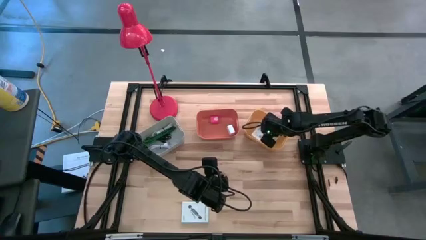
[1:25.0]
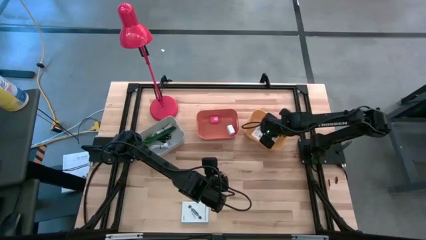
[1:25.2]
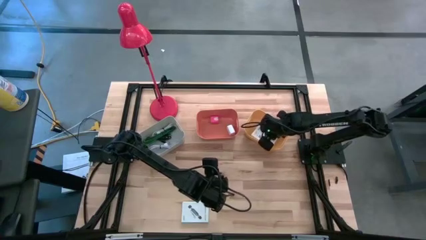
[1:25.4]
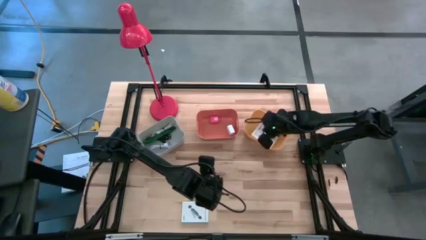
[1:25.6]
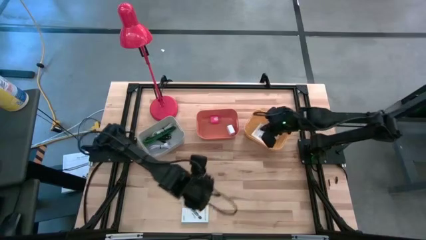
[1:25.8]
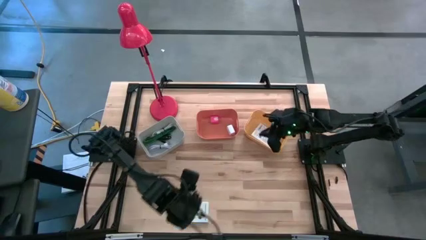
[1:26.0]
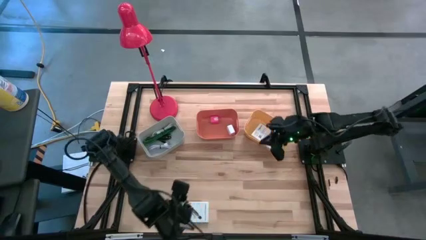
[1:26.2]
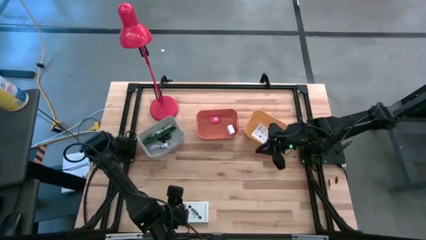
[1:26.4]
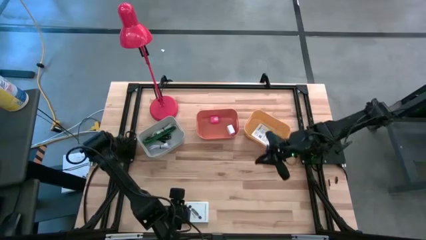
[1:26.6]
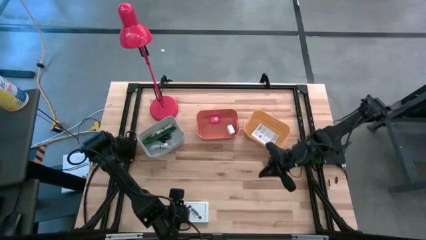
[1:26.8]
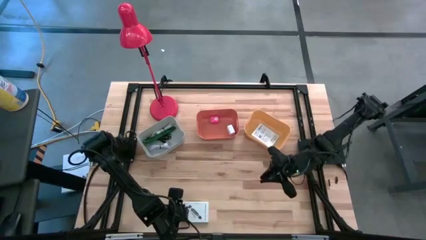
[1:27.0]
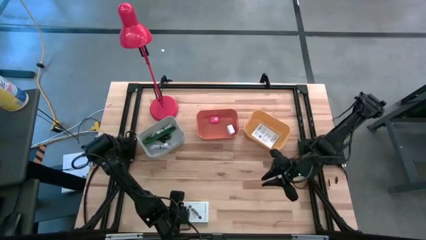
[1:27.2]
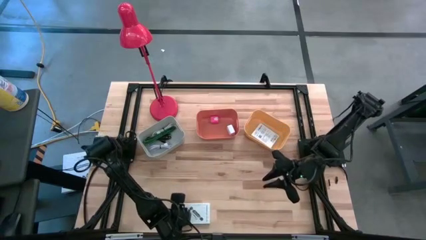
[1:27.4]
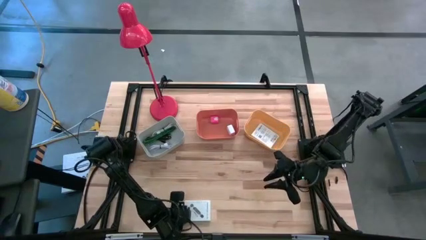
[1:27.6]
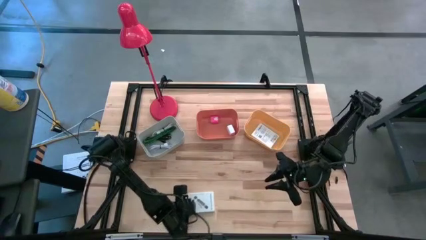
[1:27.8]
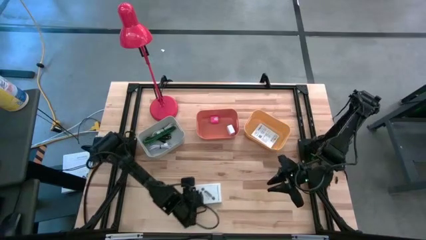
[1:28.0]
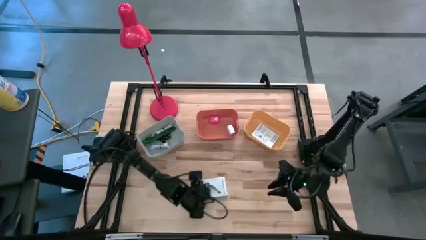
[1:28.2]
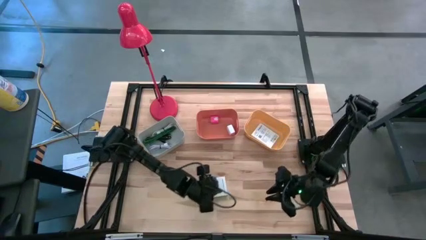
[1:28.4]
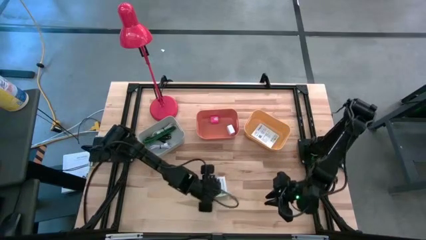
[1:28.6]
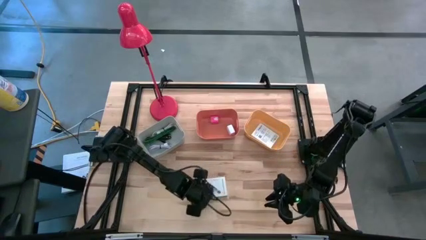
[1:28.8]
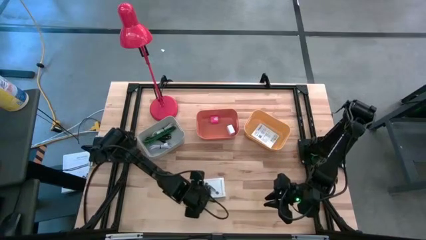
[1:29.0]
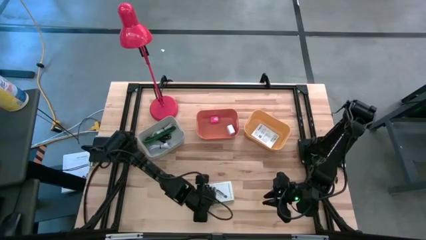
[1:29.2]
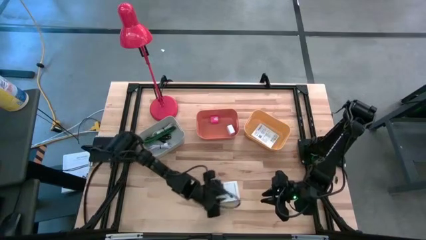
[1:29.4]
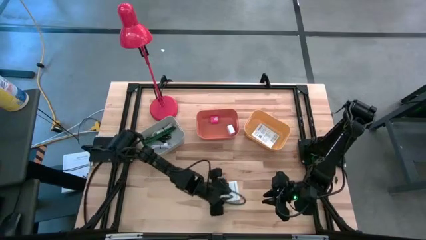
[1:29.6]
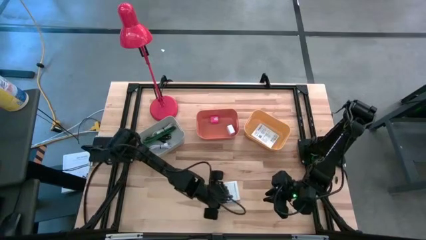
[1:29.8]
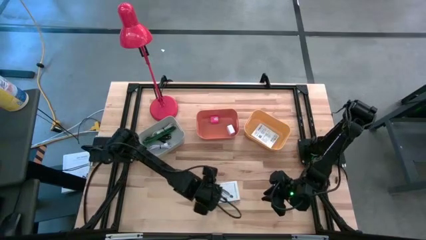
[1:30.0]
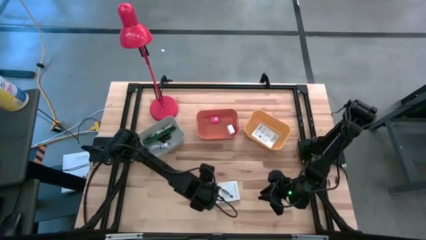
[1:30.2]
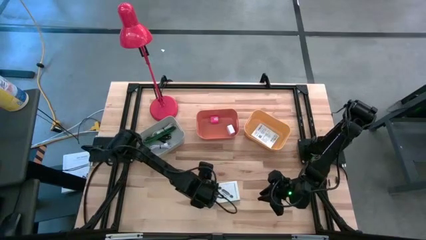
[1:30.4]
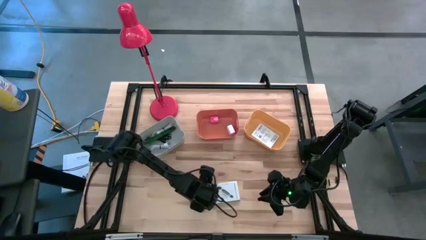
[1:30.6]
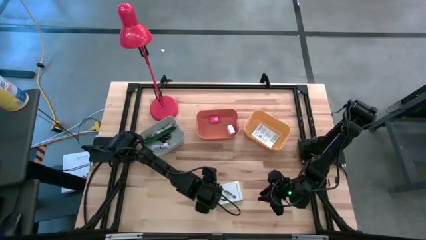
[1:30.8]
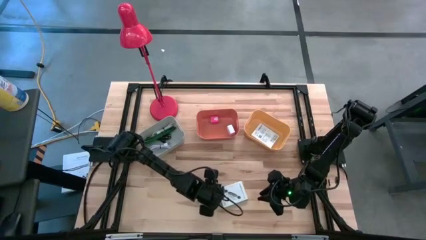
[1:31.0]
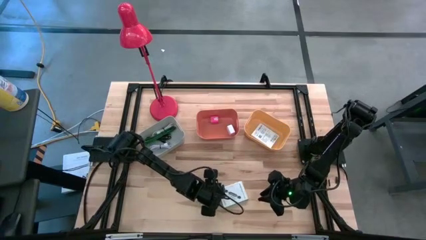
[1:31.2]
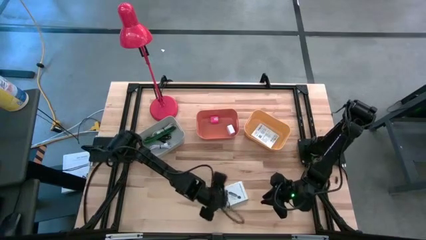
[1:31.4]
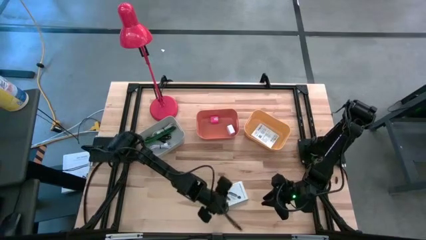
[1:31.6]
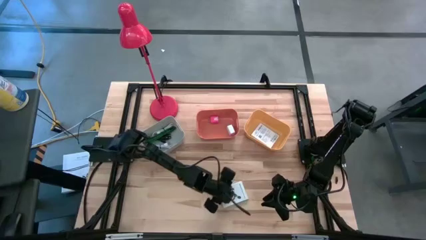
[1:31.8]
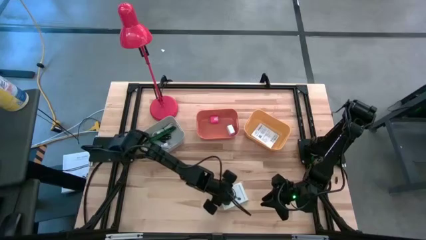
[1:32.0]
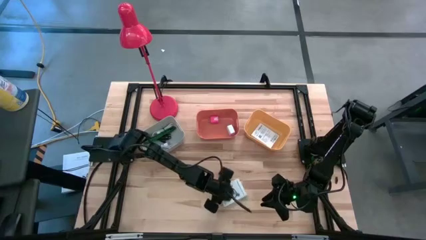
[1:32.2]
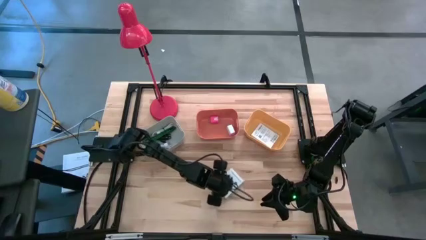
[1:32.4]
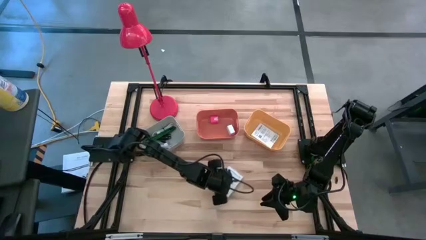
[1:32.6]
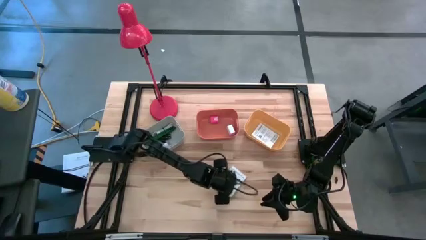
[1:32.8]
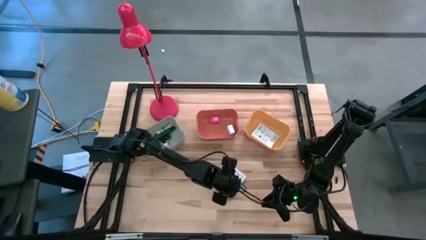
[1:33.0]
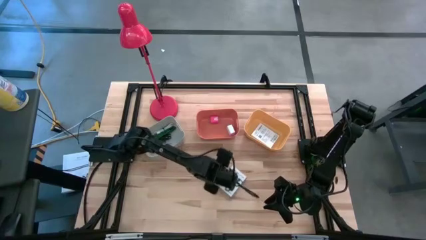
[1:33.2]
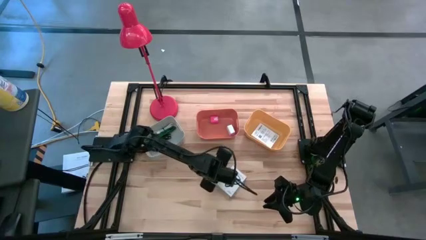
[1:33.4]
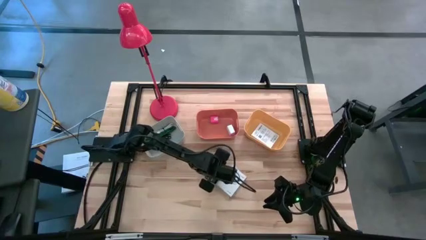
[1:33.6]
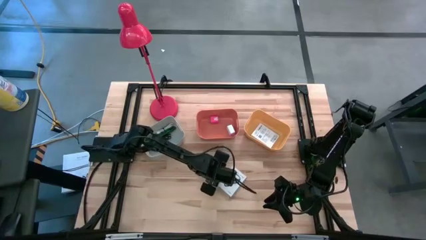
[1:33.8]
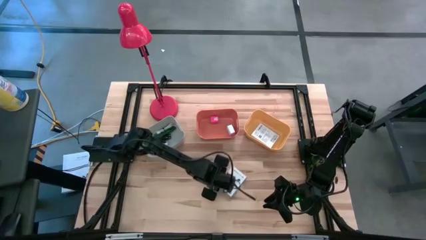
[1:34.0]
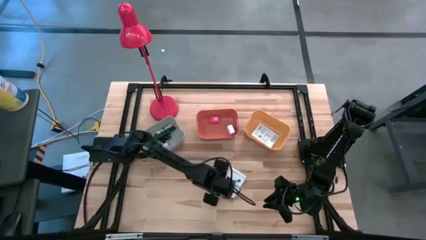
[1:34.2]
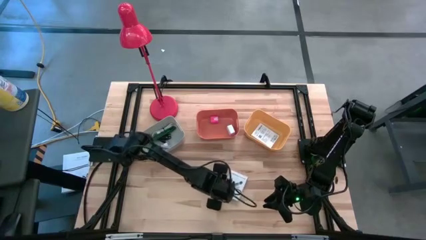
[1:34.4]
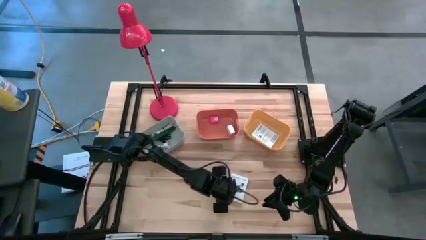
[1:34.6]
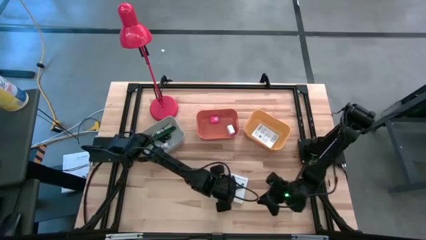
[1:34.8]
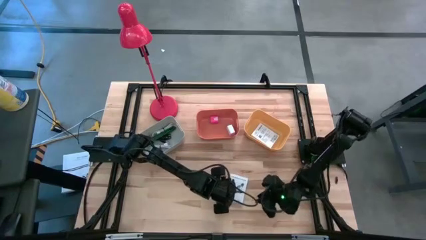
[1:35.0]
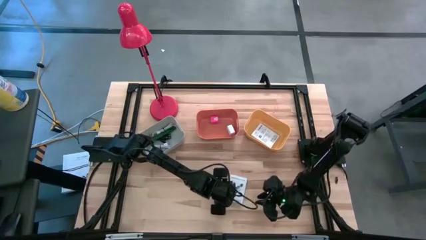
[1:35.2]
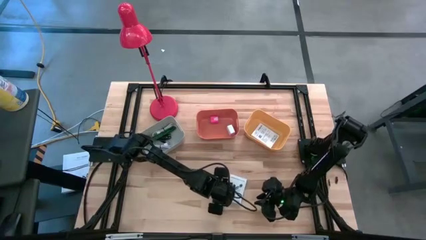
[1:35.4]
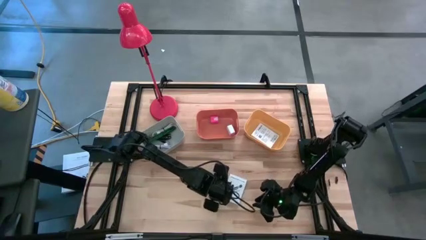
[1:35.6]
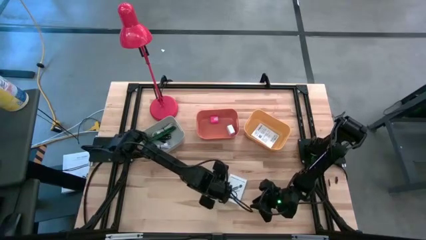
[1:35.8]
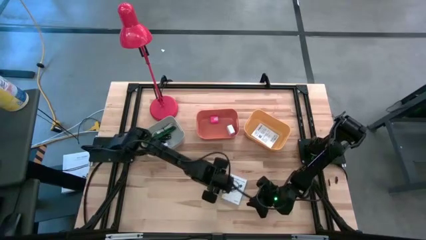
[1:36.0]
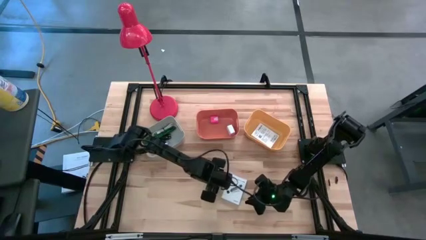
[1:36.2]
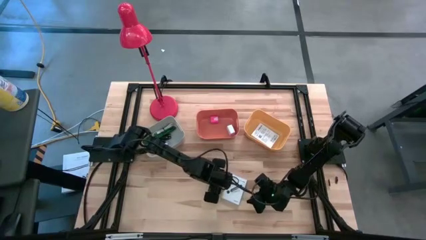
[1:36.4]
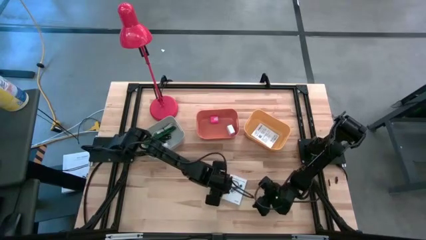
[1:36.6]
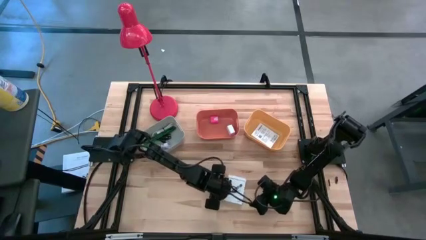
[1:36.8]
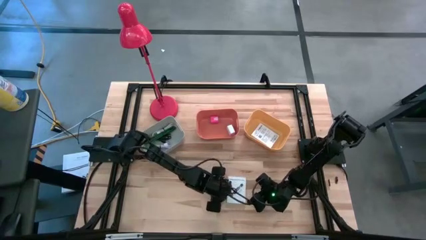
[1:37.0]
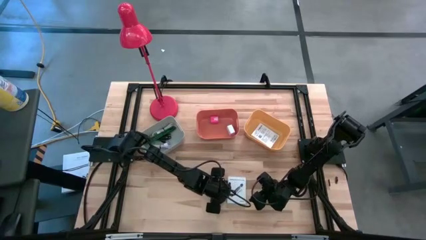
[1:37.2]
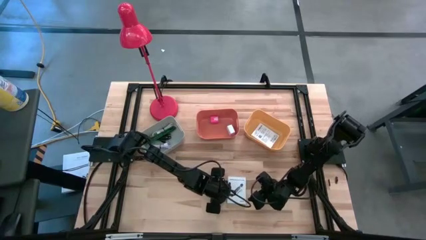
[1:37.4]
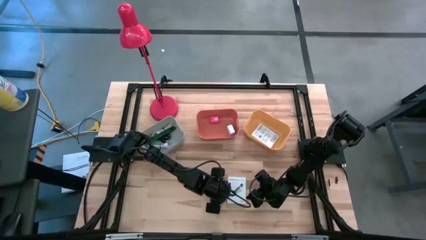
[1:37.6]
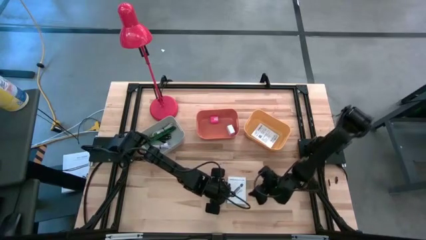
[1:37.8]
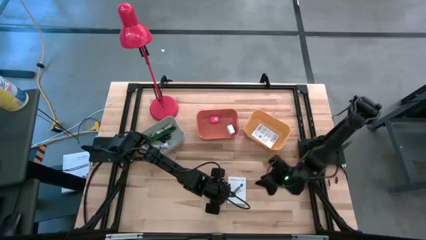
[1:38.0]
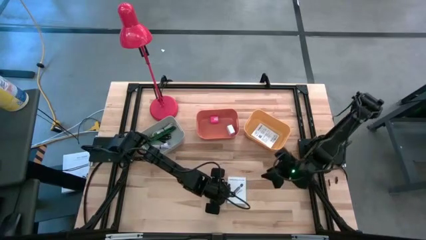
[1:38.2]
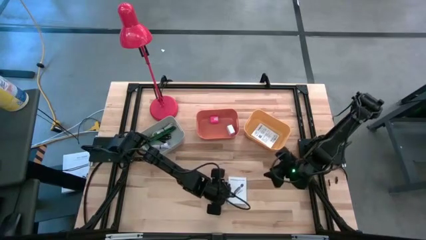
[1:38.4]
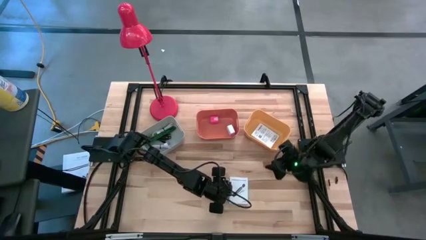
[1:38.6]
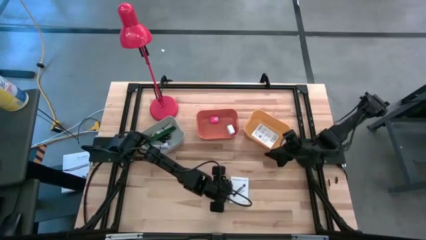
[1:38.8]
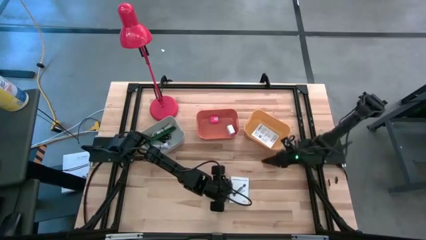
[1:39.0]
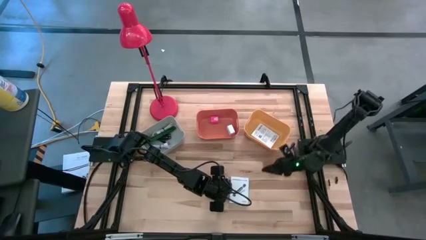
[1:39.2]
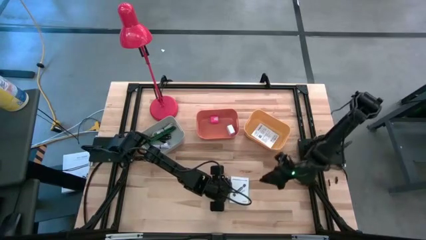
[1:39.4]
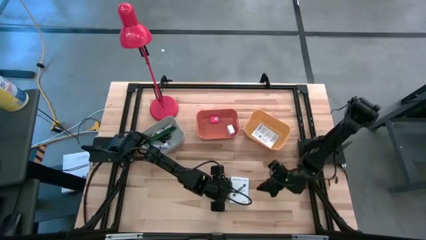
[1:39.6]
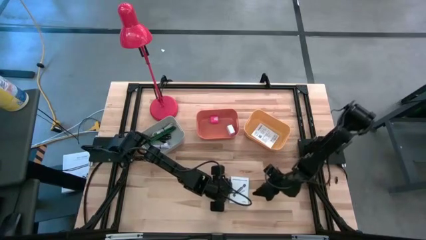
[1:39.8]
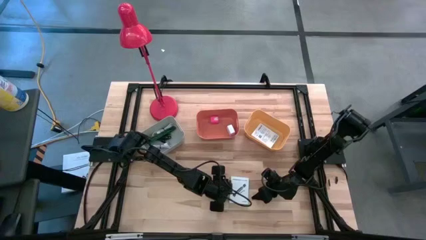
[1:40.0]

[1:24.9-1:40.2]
Task: Pick and place items into bin
Put the white box on top of the other white box in the yellow bin
